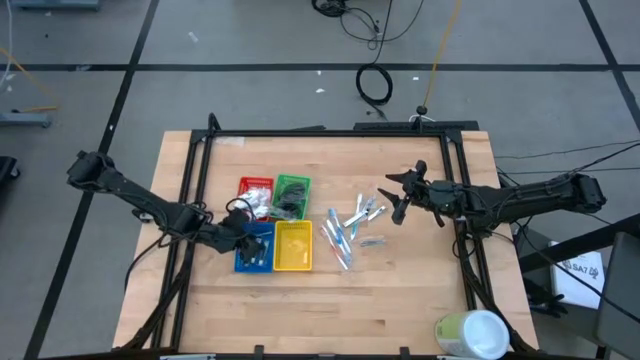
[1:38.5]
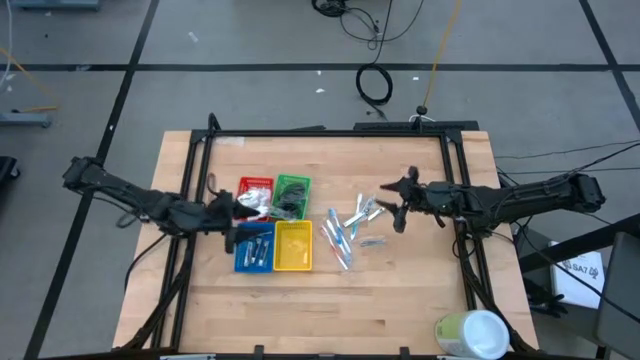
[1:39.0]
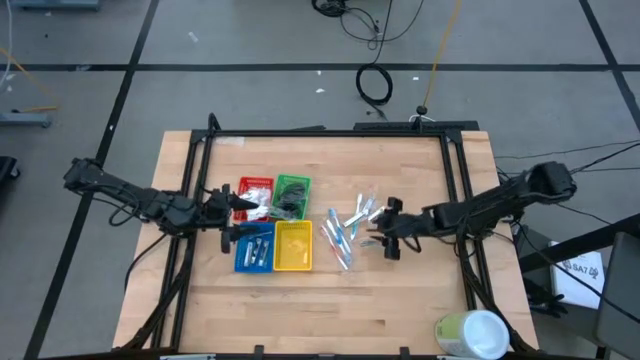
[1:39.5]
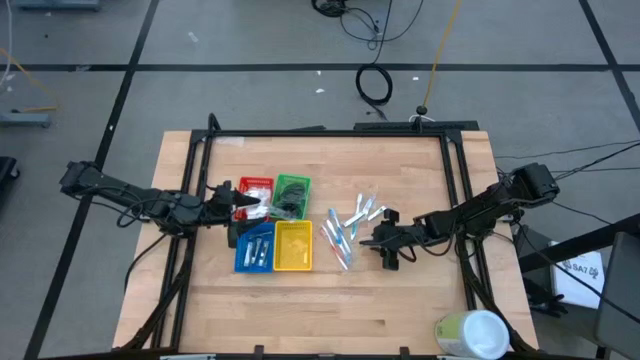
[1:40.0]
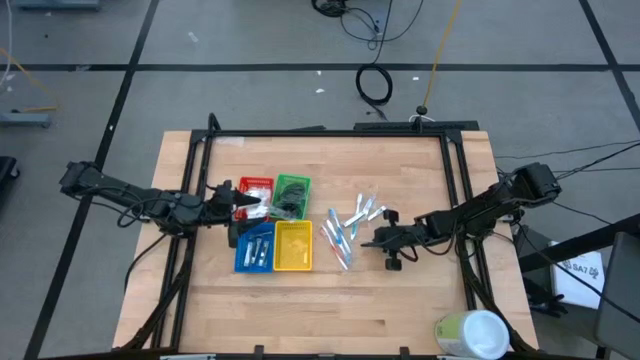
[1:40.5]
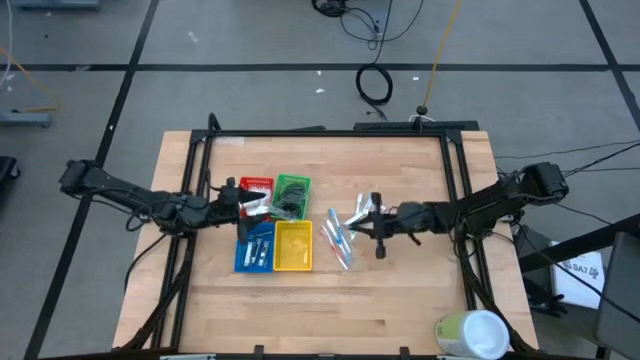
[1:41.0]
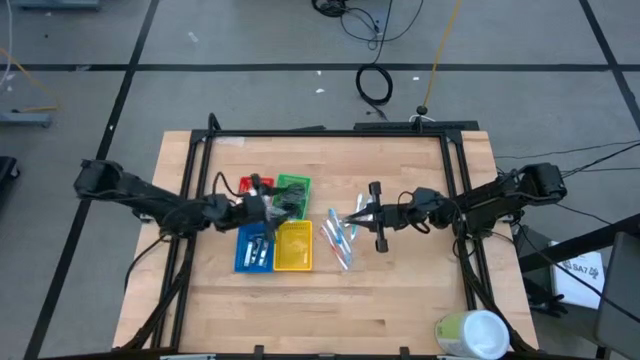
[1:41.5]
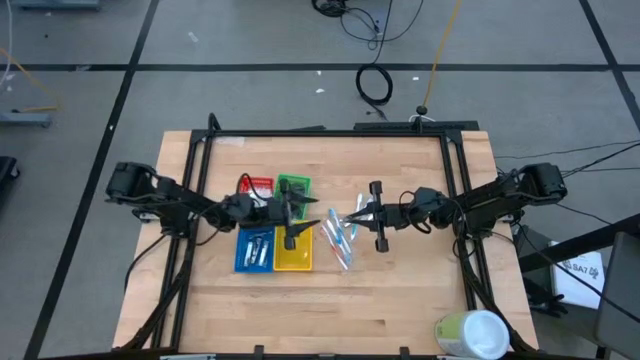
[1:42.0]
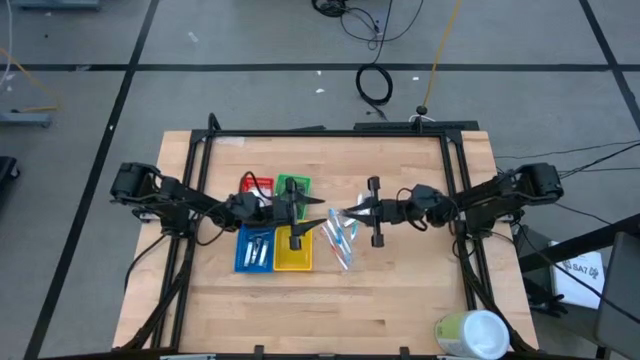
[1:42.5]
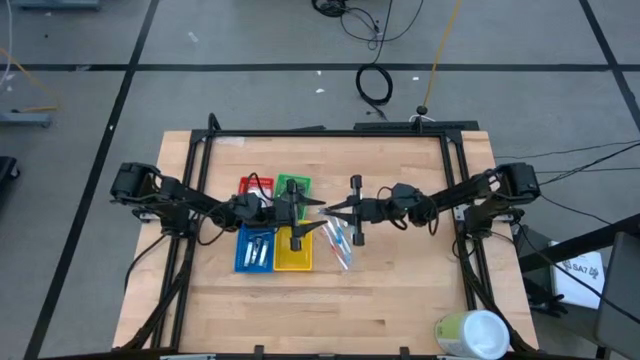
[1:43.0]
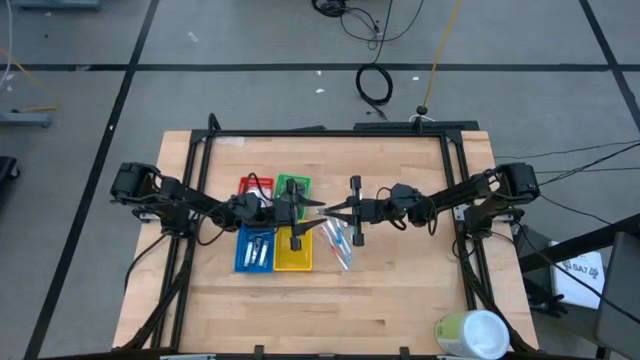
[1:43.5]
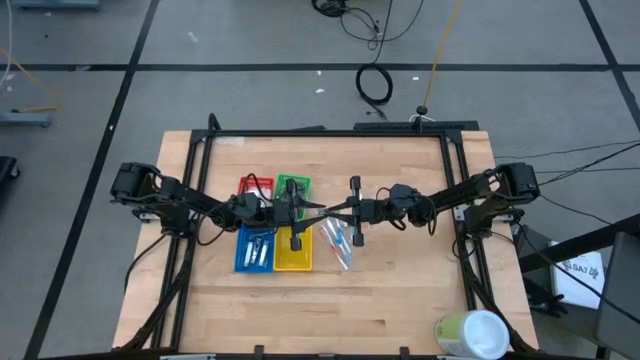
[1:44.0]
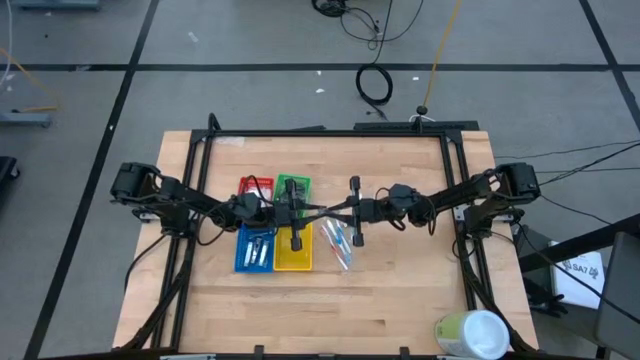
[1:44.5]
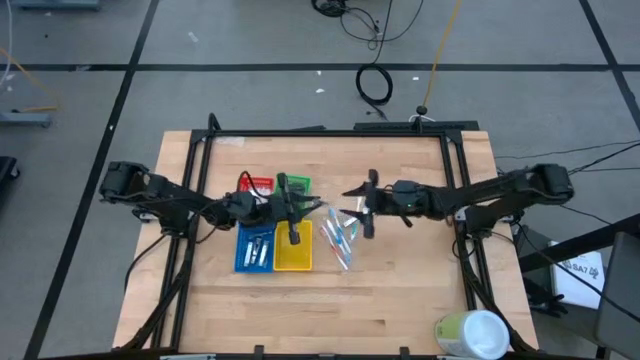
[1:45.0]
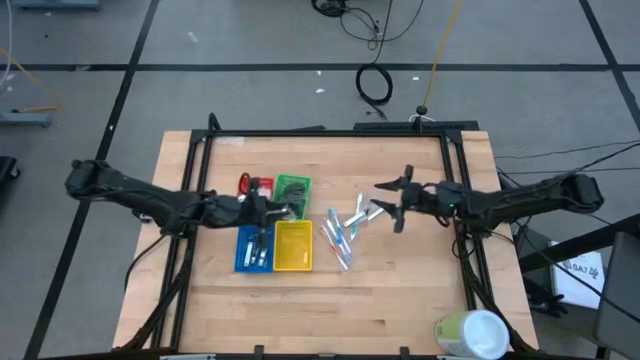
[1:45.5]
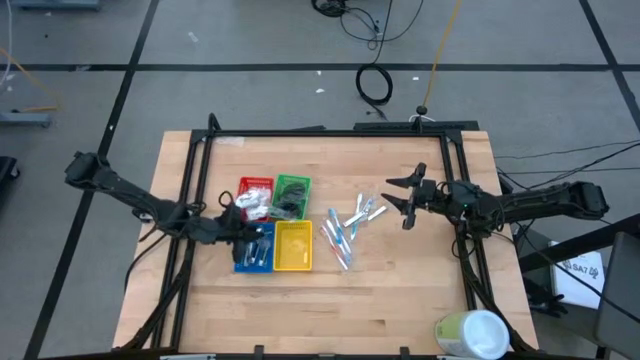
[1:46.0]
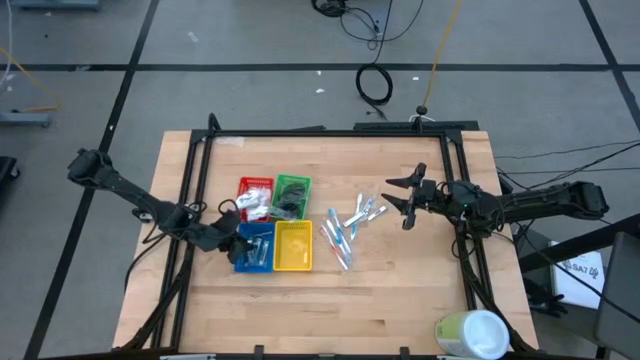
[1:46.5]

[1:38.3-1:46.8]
Task: Pick & Place Travel size toiletries
Put the silver nail cutter into the blue bin

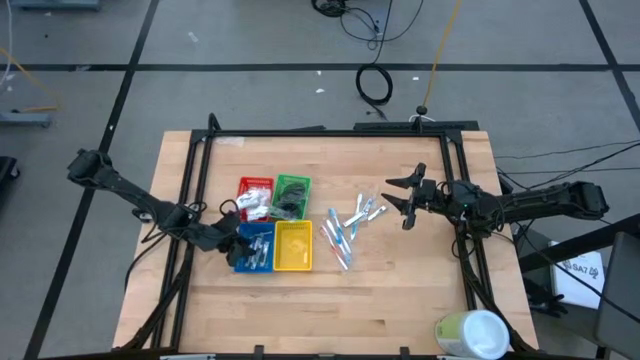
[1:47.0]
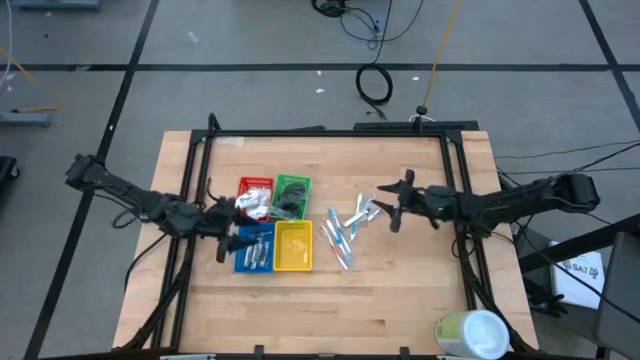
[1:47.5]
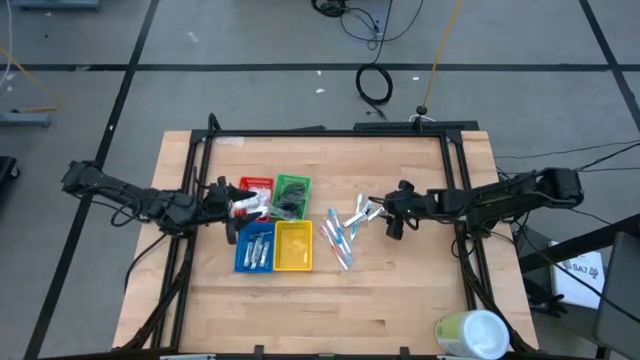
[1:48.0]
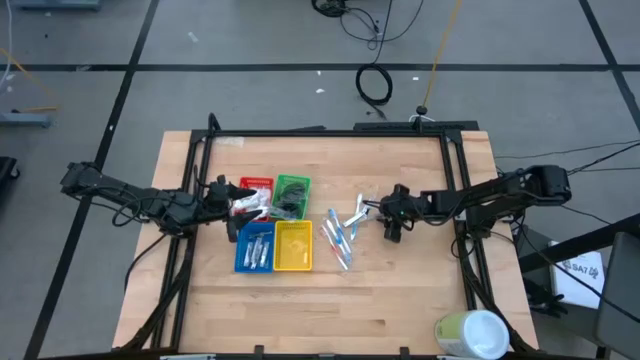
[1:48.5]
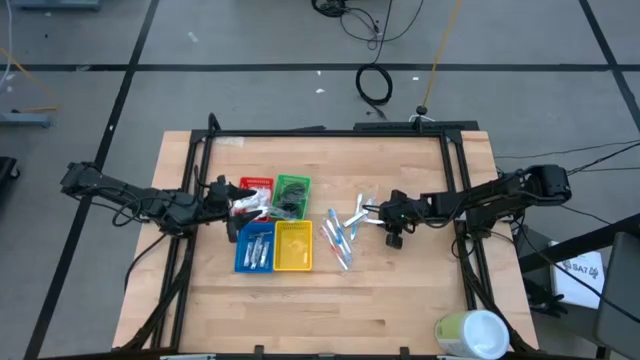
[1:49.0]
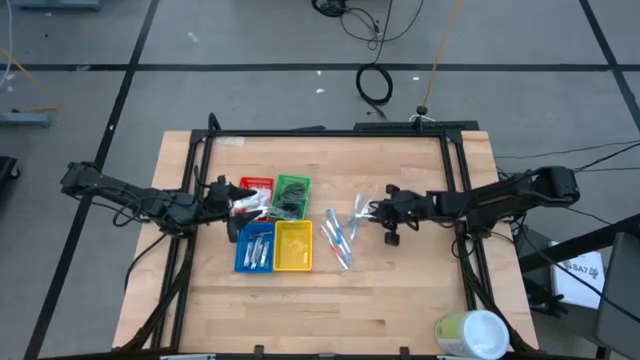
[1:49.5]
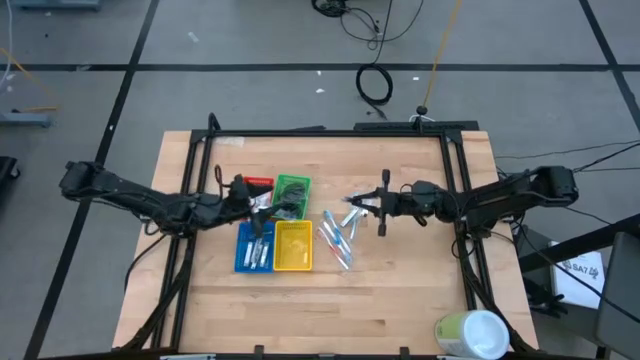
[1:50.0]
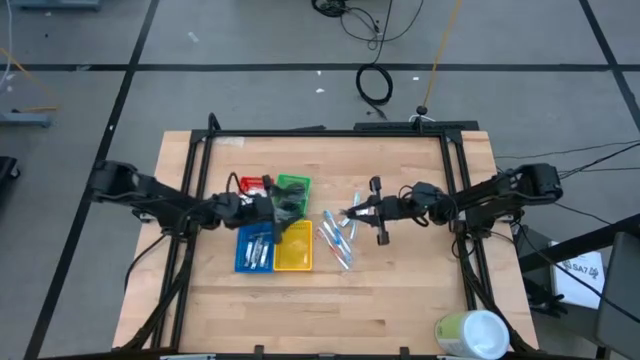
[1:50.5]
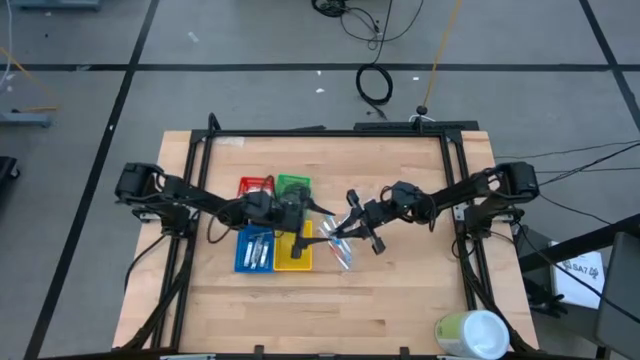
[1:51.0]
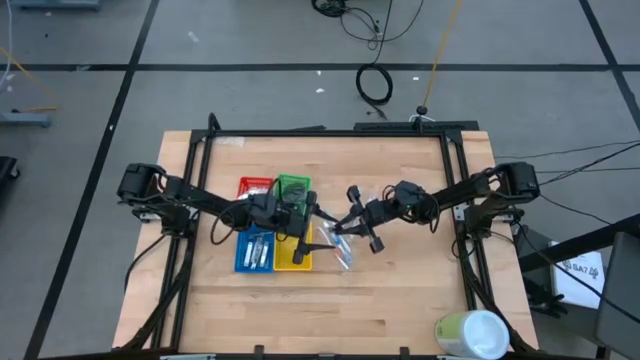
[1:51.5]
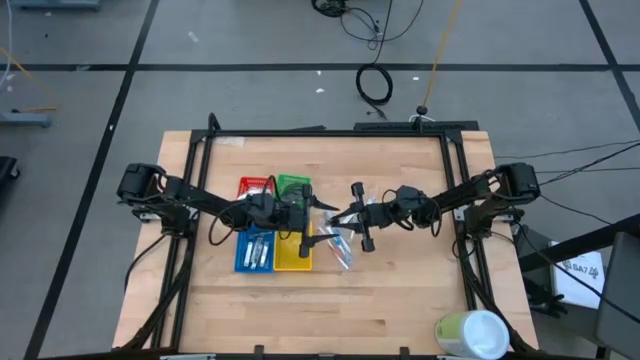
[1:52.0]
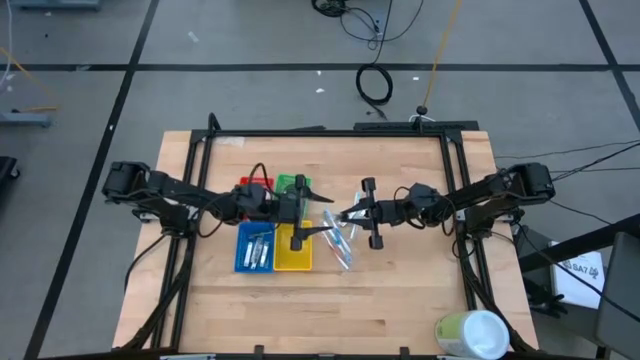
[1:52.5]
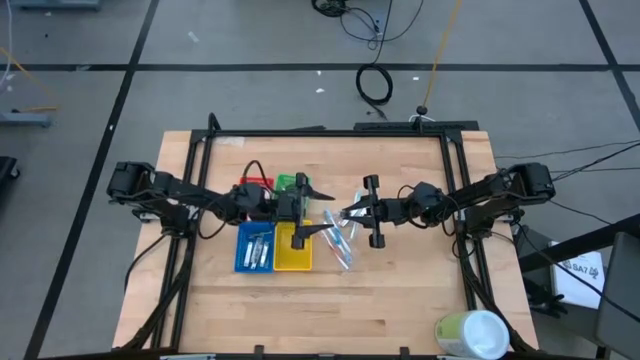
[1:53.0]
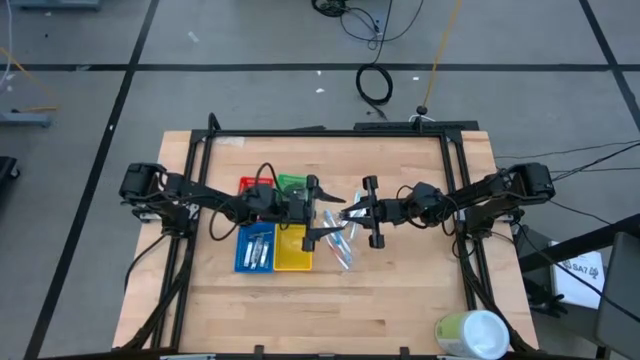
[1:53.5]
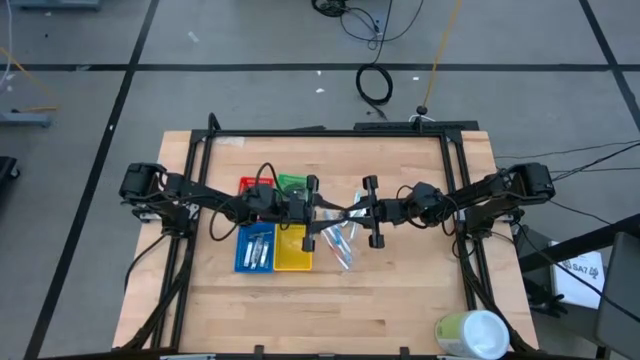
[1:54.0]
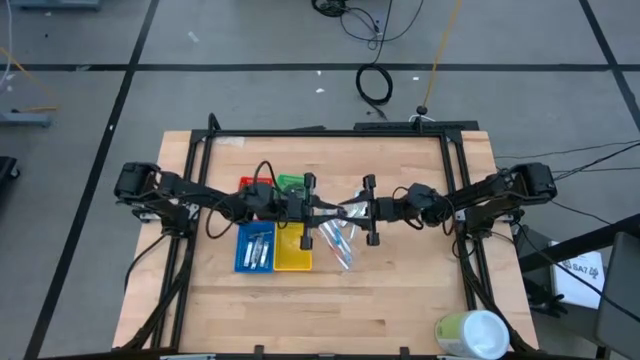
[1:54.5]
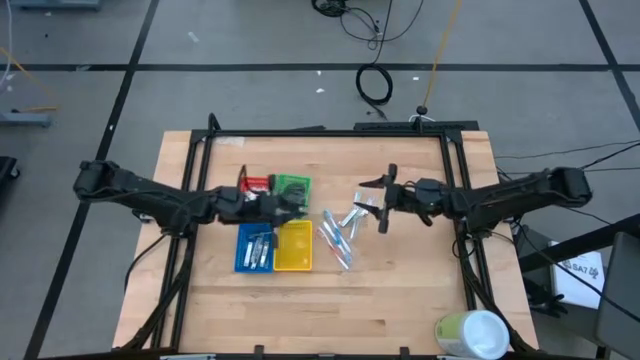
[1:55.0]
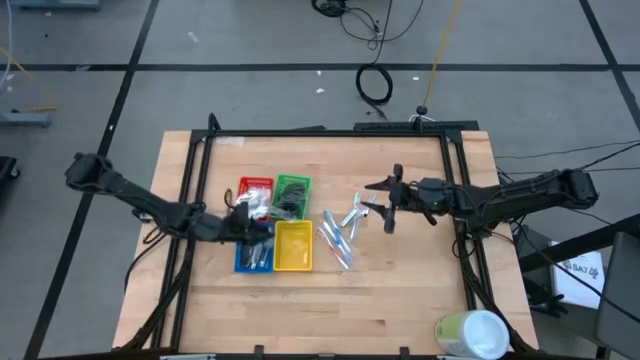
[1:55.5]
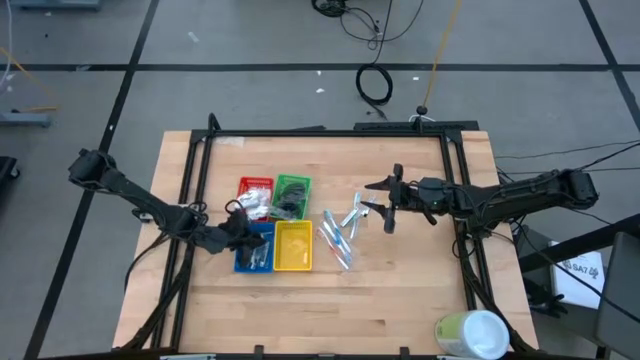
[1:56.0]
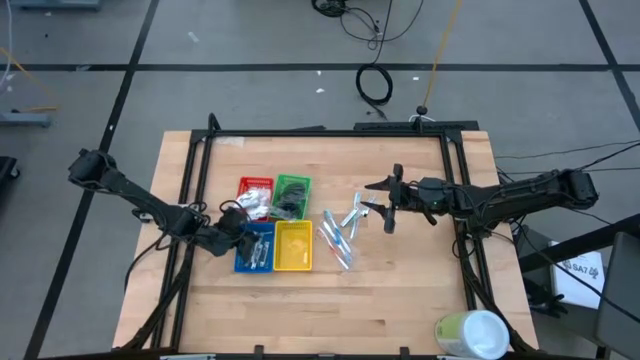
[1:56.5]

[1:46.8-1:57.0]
Put the silver nail cutter into the blue bin

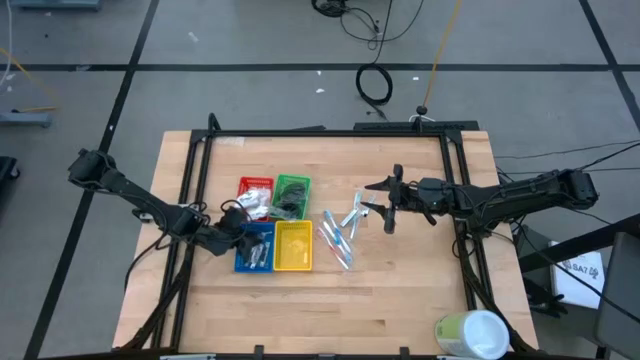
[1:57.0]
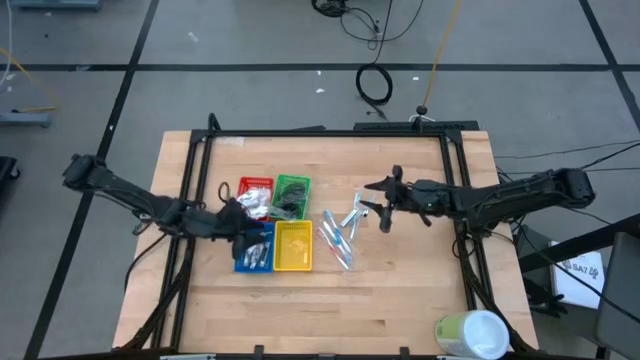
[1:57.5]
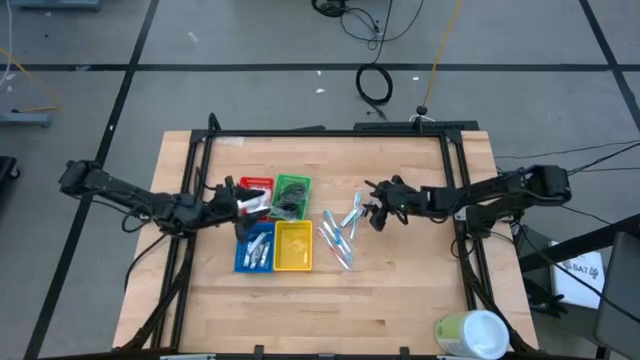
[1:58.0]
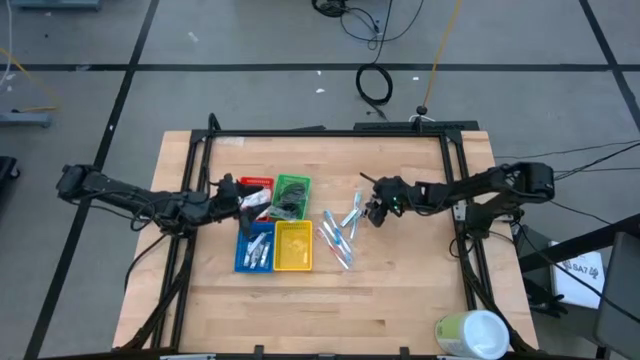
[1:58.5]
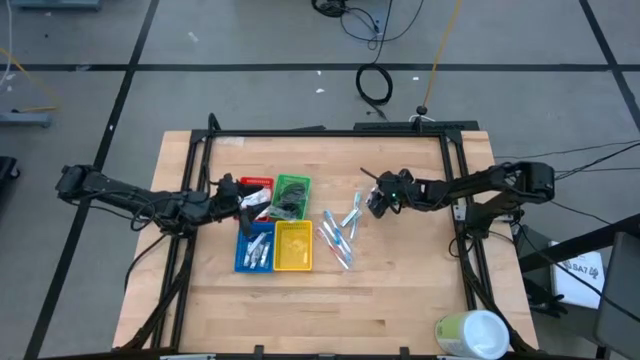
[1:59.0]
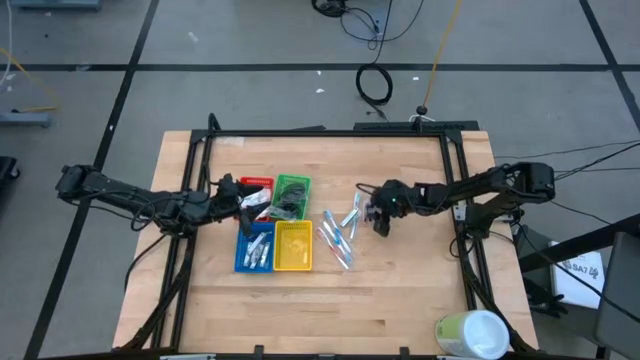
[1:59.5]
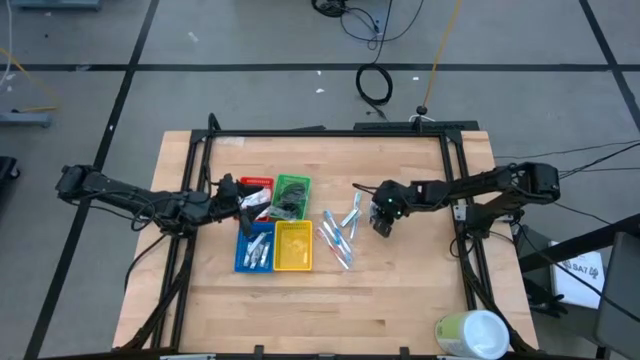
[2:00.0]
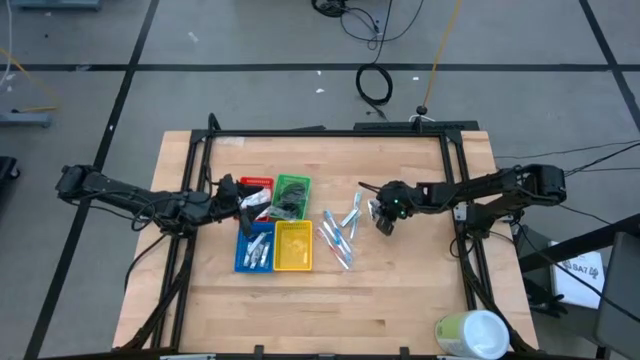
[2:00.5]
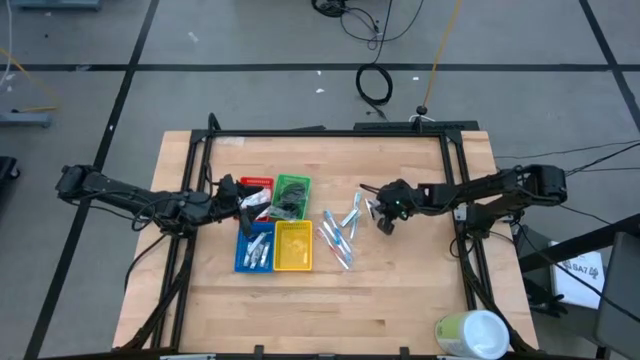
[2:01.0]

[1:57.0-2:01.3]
Put the silver nail cutter into the blue bin
